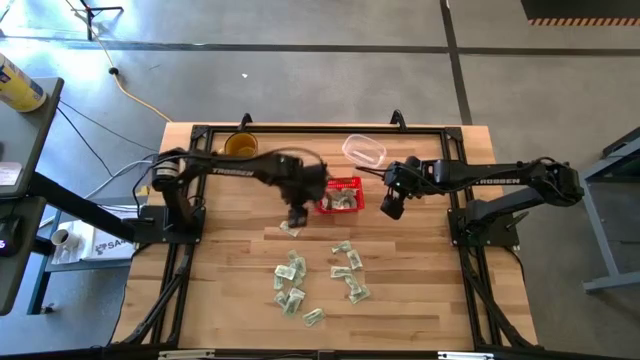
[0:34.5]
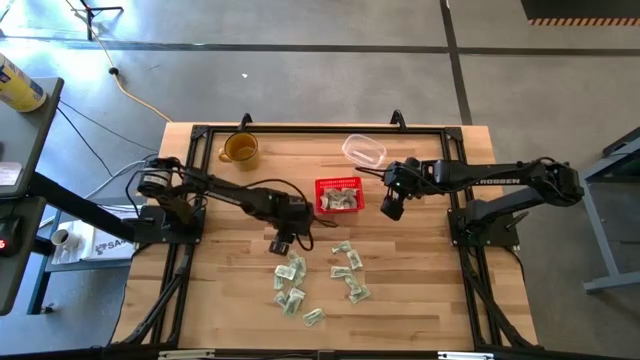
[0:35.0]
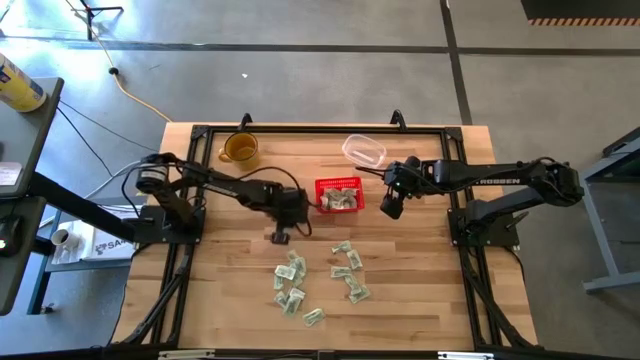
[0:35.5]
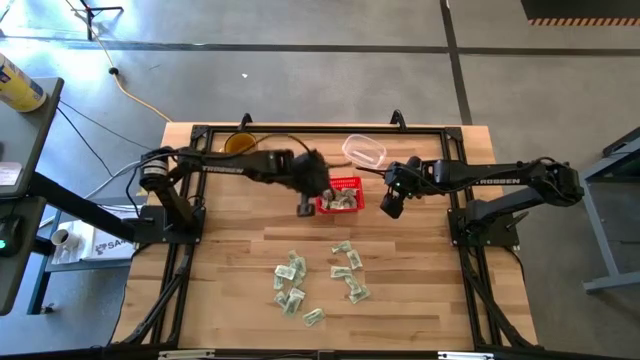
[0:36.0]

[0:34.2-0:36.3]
Task: Pick and place items into bin
Put the white packet into the red basket

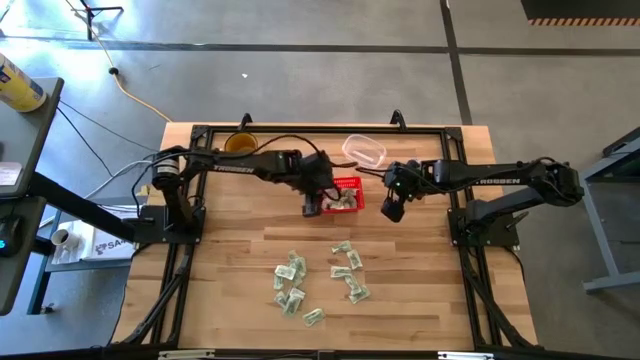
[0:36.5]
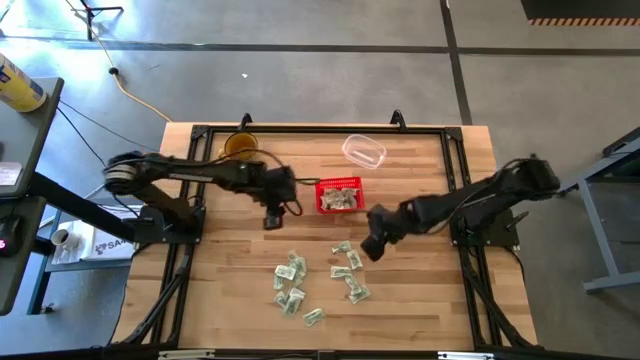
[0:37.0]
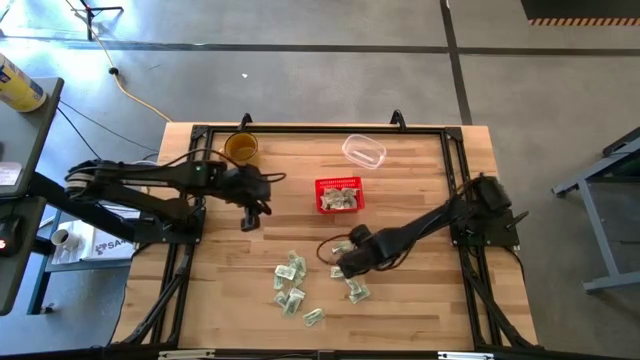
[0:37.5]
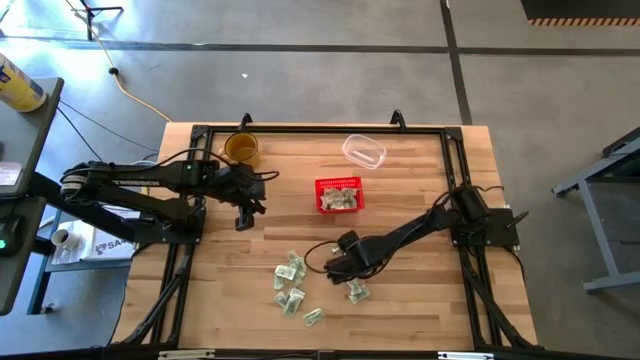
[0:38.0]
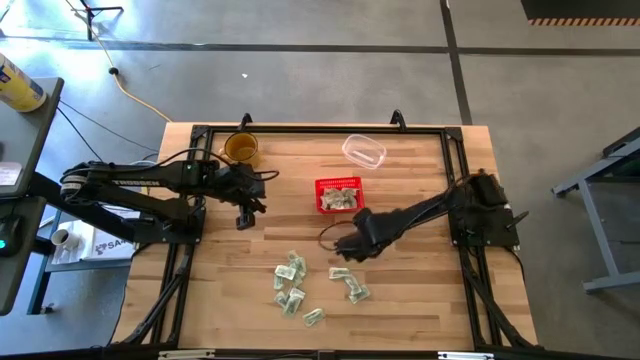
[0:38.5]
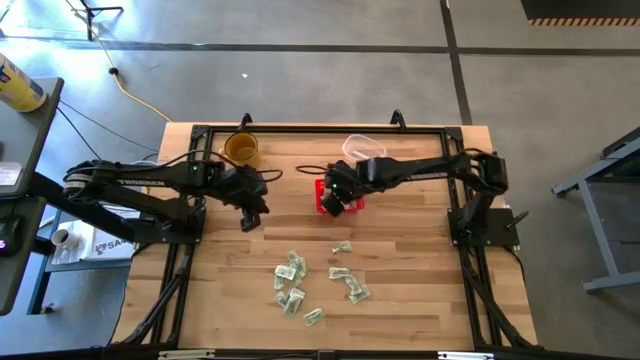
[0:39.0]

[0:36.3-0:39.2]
Put the white packet into the red basket

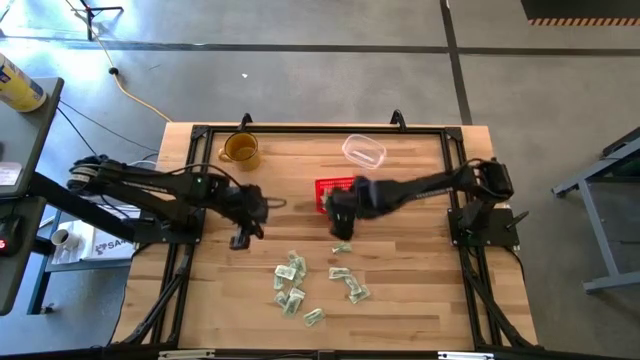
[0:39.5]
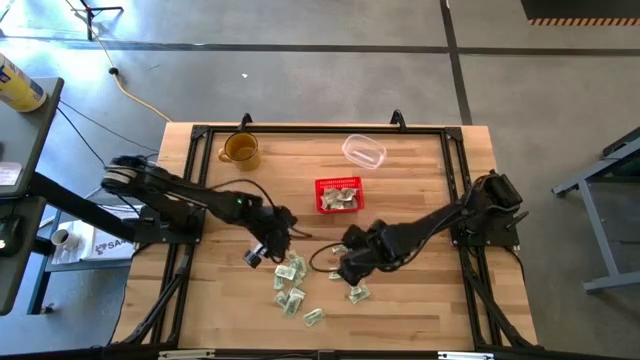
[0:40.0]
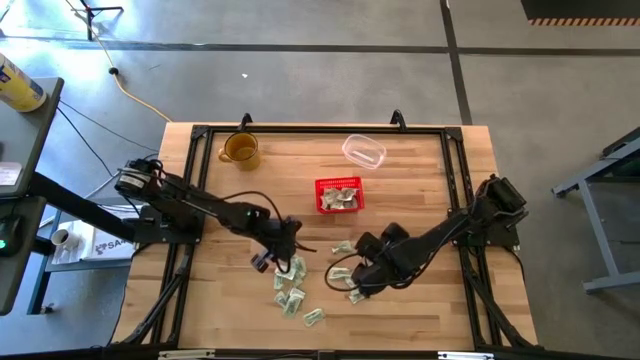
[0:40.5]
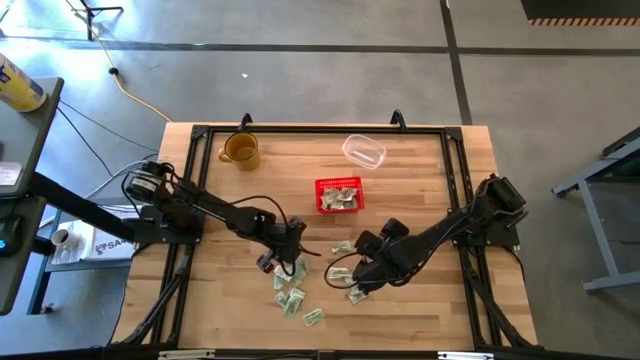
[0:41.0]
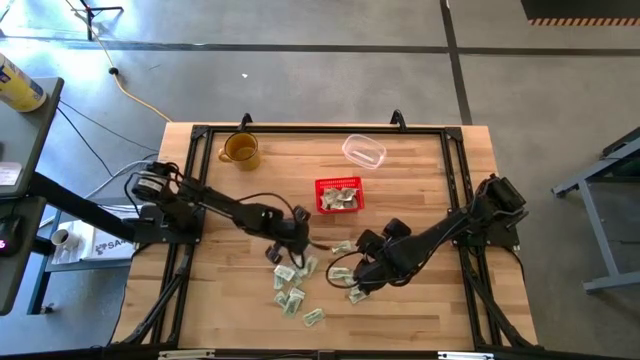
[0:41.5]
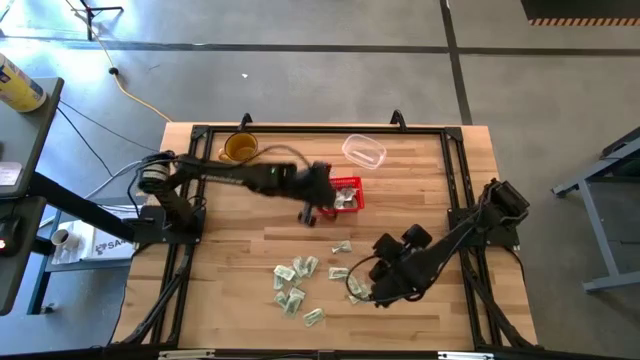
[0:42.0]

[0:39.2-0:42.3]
Put the white packet into the red basket

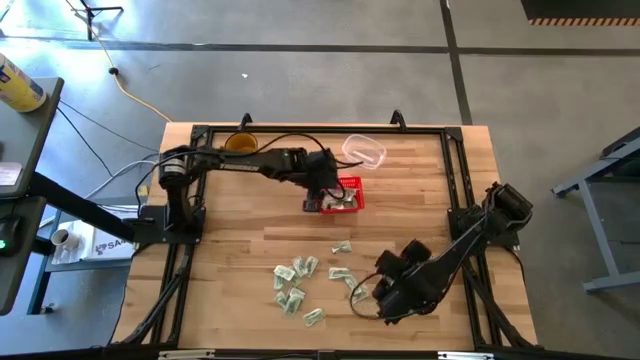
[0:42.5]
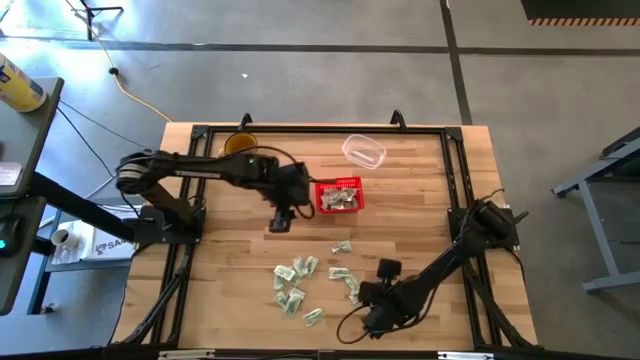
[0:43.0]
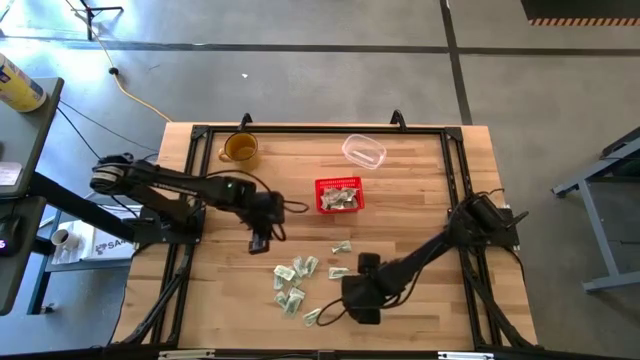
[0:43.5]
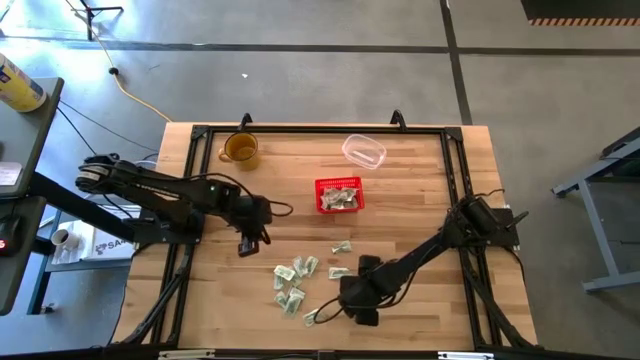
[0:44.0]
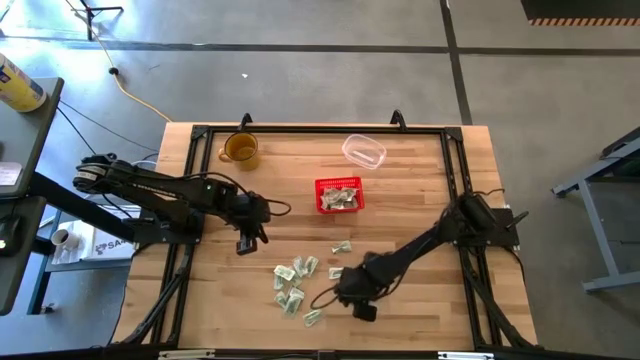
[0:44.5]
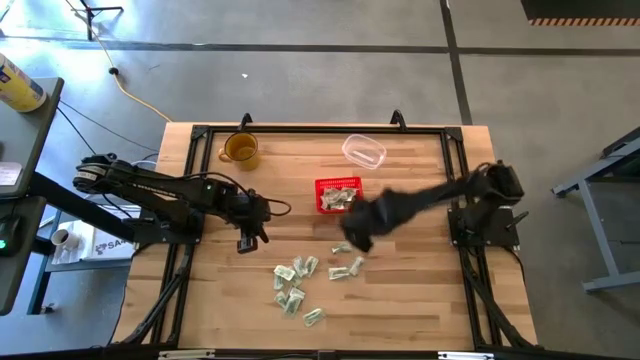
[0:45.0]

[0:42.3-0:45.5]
Put the white packet into the red basket

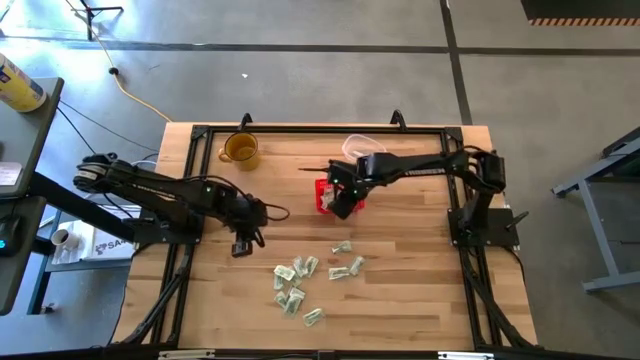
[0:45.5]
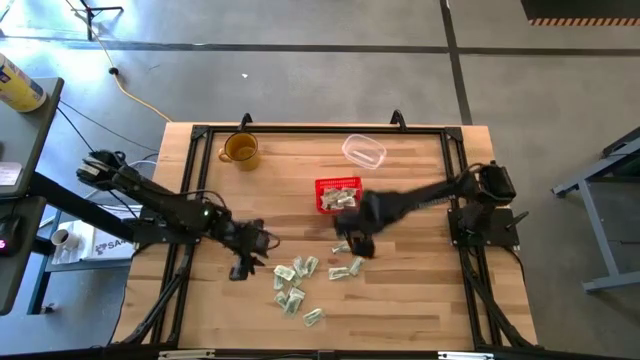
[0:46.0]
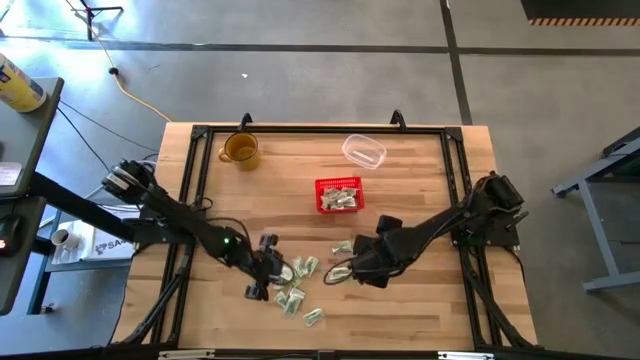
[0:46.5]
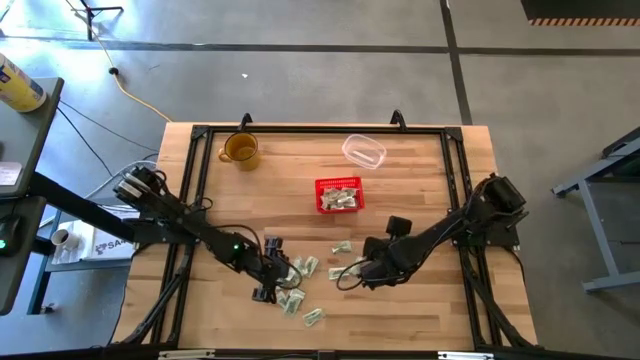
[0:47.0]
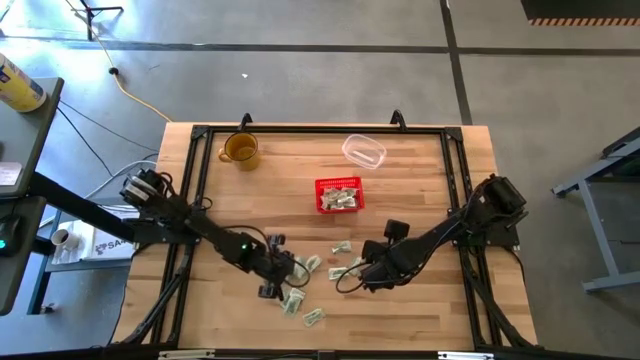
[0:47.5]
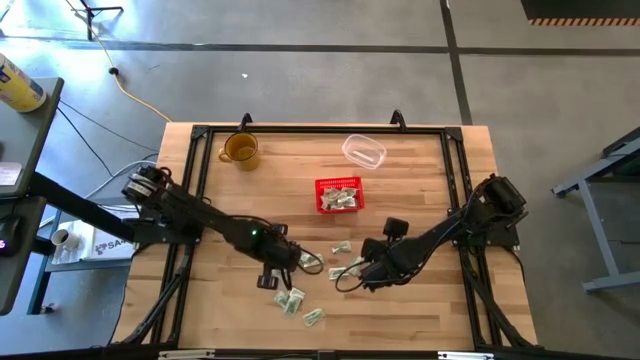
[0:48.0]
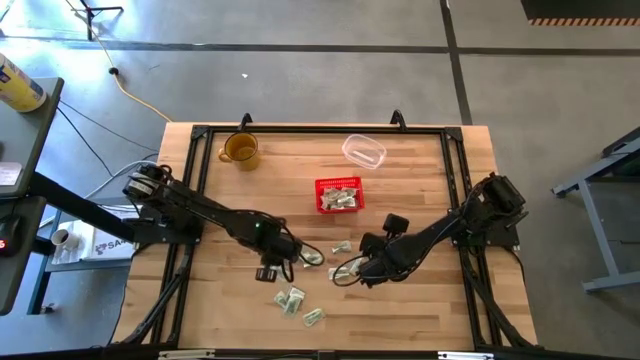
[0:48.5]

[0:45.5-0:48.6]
Put the white packet into the red basket

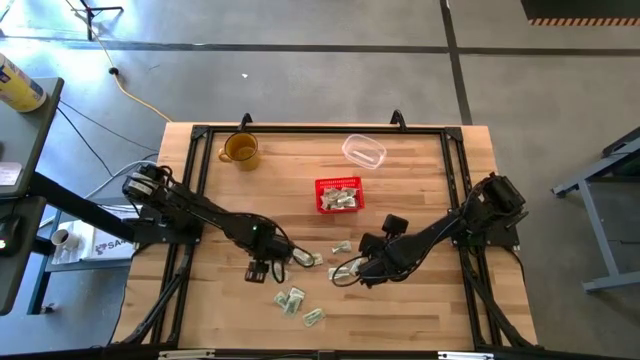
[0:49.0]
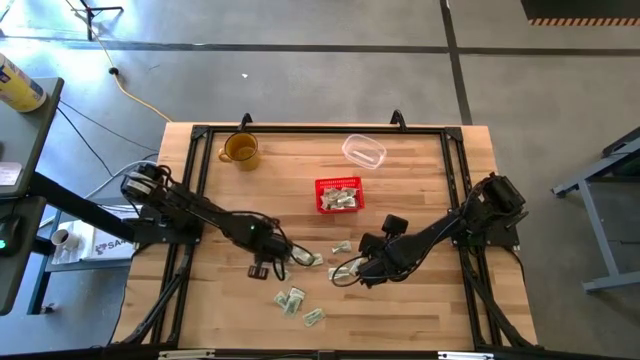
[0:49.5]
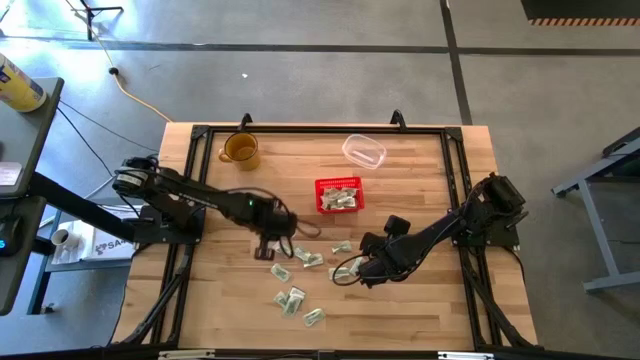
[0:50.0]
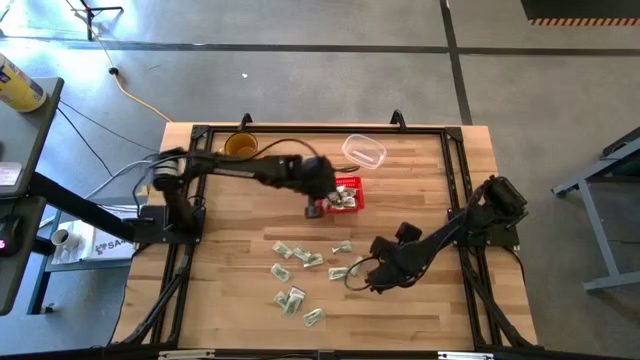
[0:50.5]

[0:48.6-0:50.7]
Put the white packet into the red basket

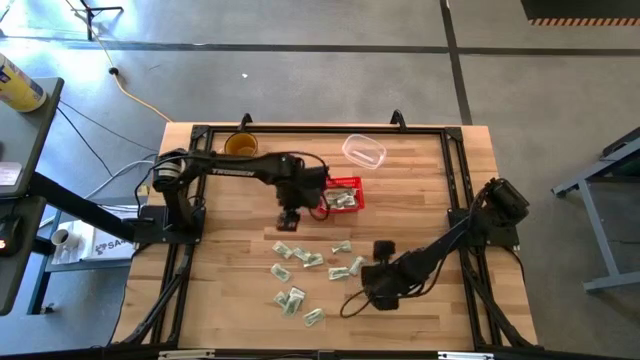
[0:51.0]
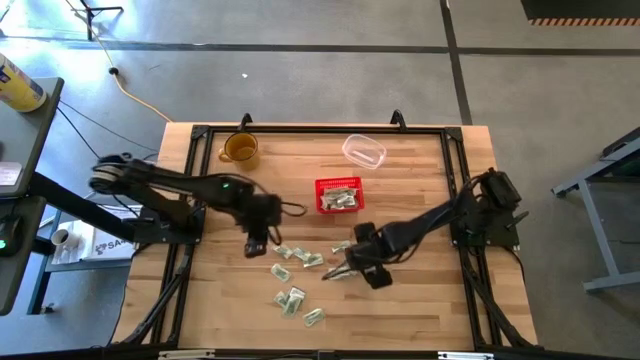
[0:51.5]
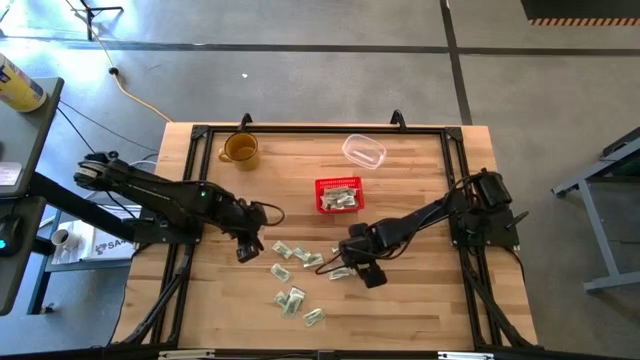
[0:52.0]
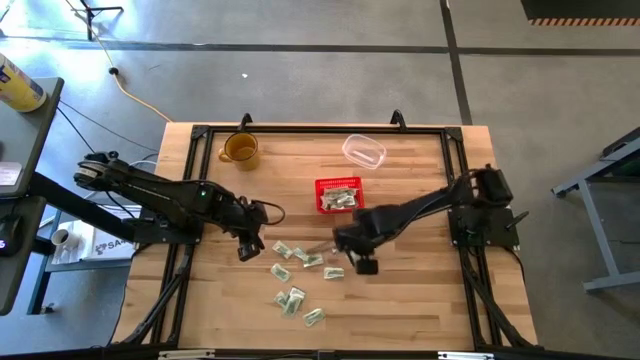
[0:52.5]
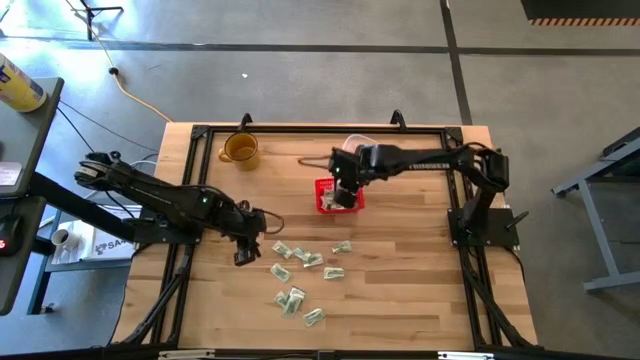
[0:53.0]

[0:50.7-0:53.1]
Put the white packet into the red basket

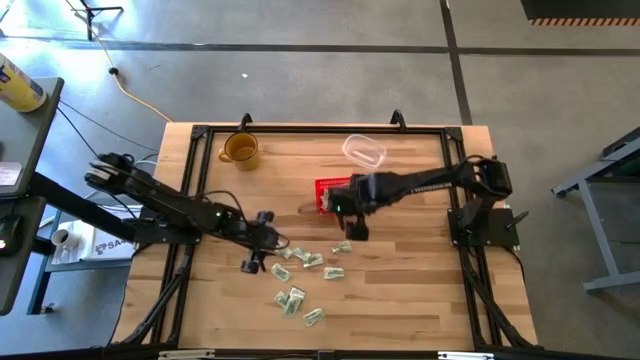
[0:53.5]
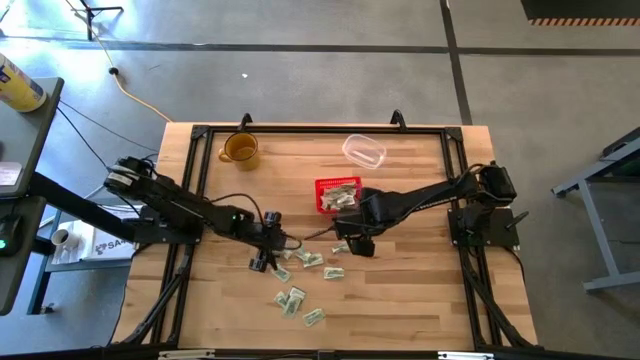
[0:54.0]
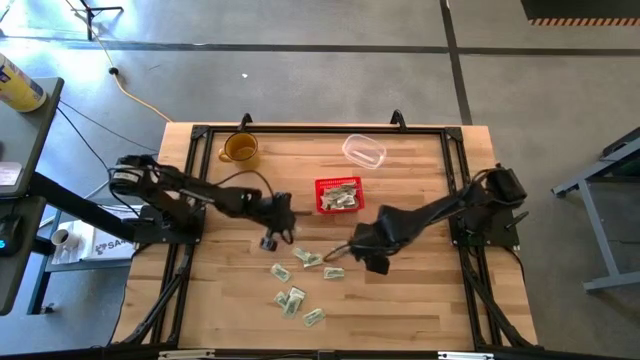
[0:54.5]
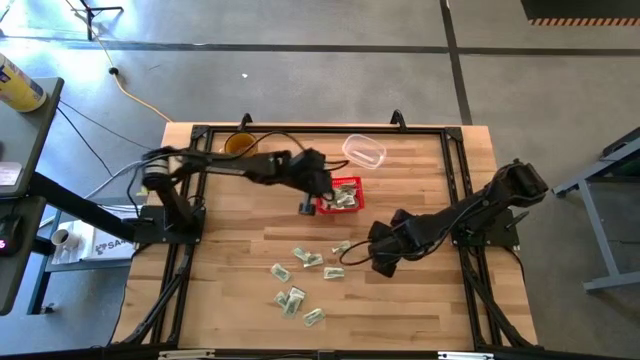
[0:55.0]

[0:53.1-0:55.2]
Put the white packet into the red basket

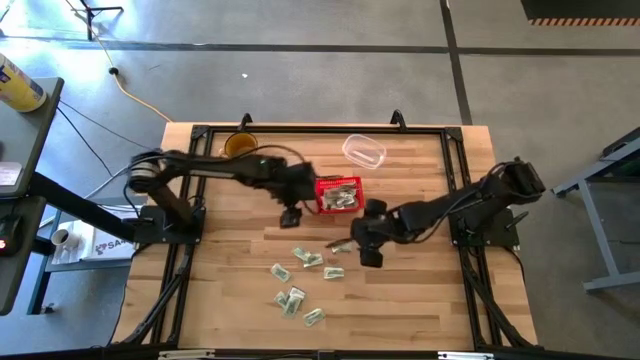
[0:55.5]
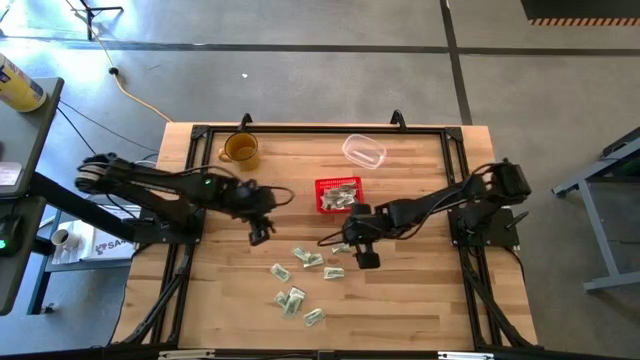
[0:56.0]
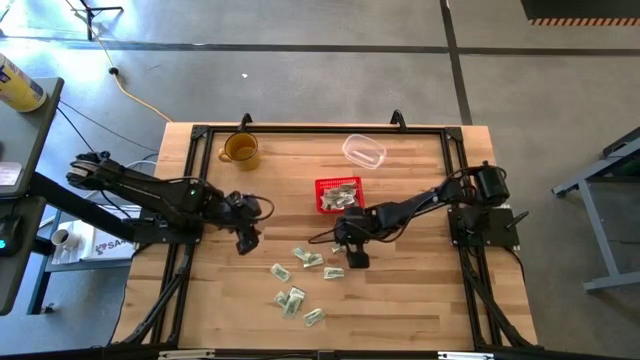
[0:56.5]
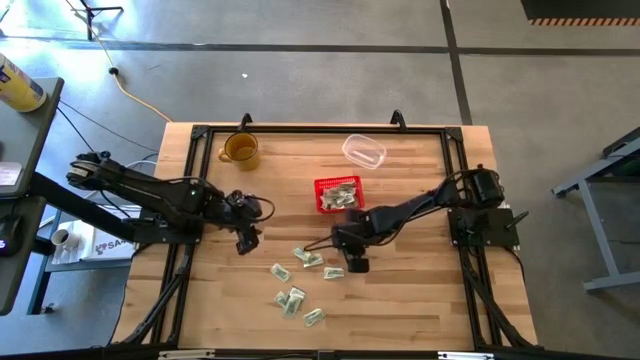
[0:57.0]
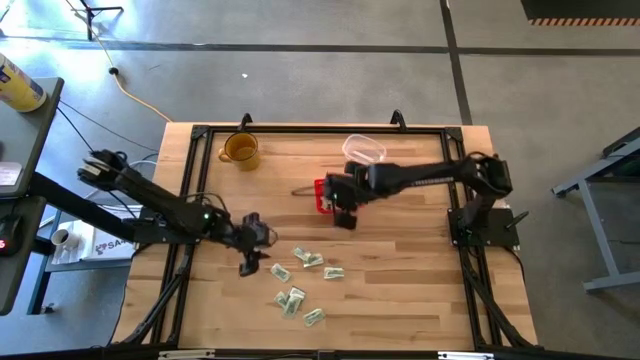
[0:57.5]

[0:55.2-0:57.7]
Put the white packet into the red basket
